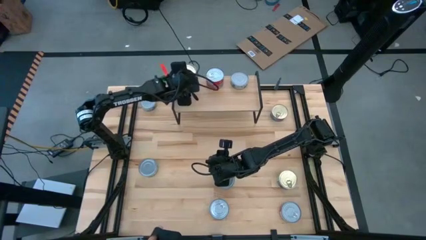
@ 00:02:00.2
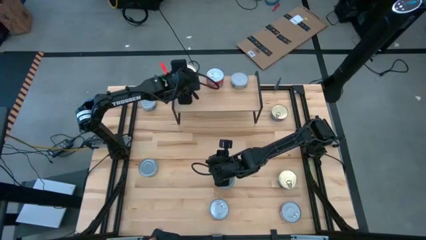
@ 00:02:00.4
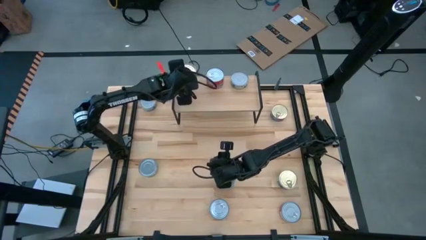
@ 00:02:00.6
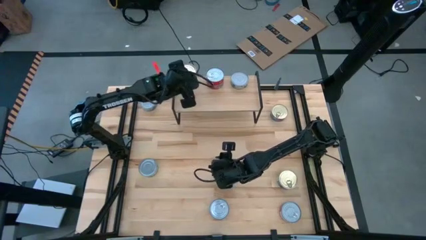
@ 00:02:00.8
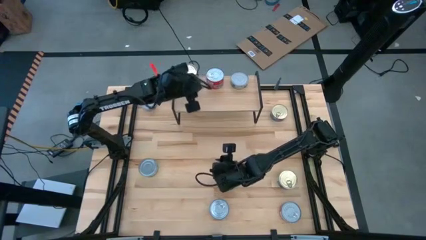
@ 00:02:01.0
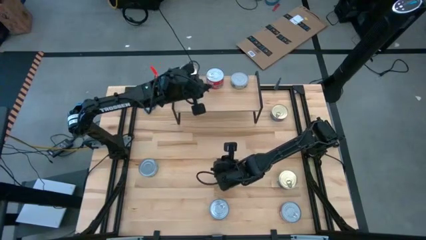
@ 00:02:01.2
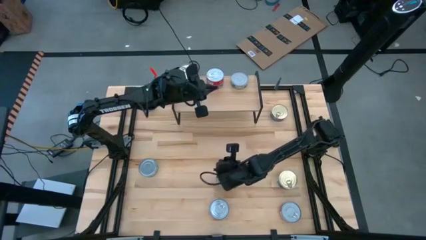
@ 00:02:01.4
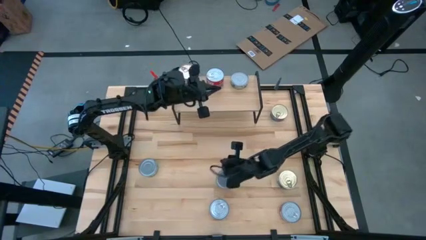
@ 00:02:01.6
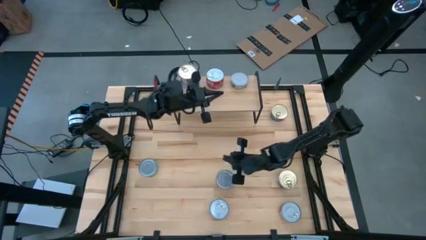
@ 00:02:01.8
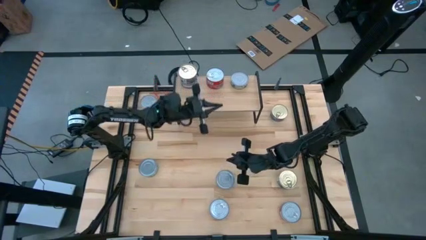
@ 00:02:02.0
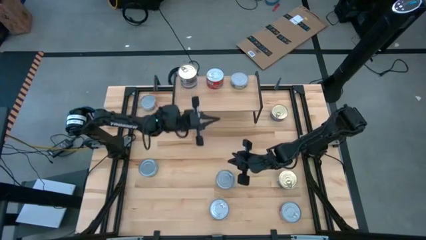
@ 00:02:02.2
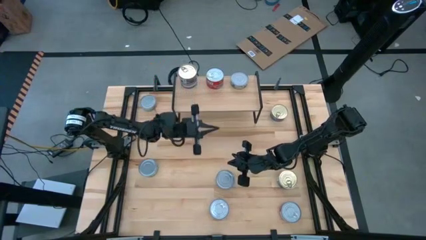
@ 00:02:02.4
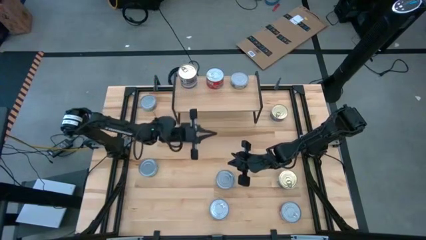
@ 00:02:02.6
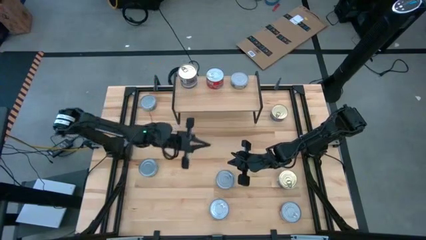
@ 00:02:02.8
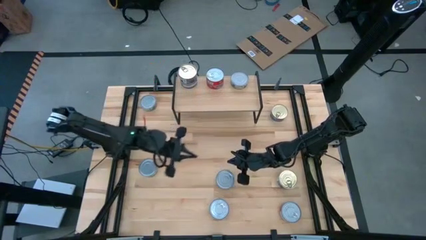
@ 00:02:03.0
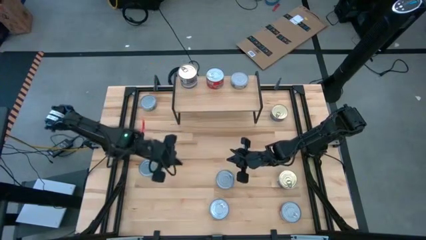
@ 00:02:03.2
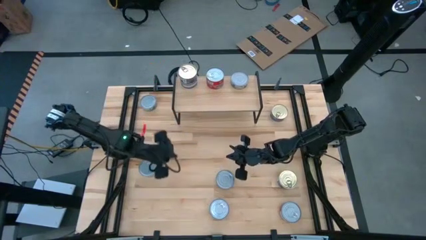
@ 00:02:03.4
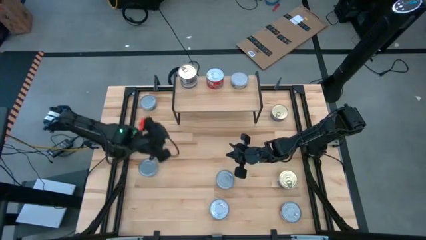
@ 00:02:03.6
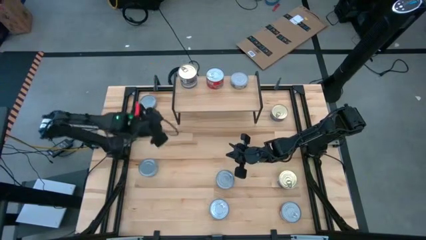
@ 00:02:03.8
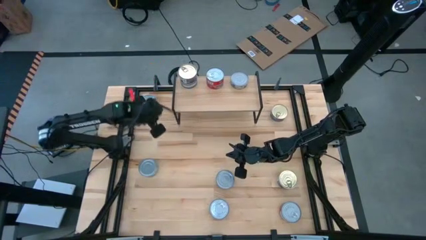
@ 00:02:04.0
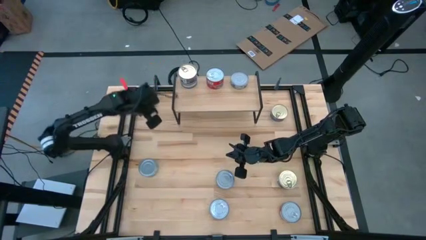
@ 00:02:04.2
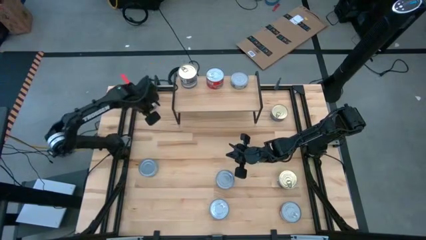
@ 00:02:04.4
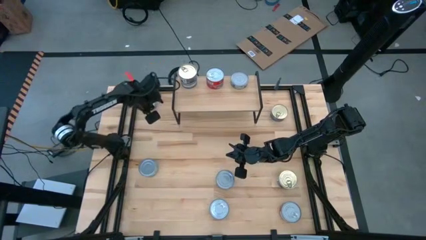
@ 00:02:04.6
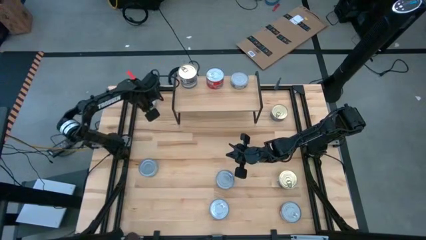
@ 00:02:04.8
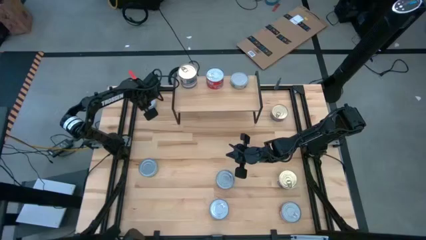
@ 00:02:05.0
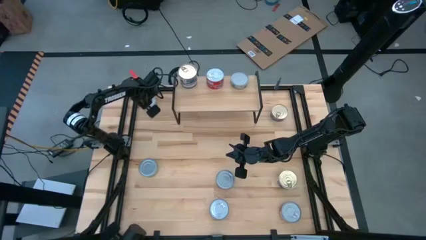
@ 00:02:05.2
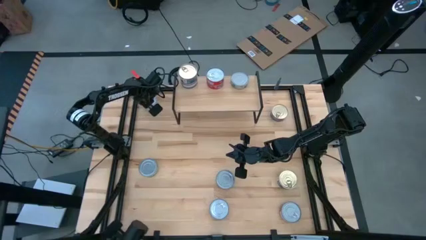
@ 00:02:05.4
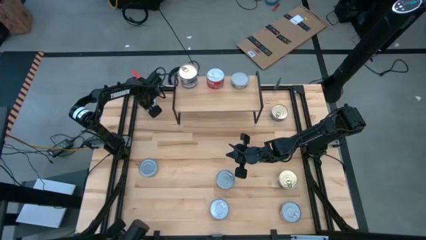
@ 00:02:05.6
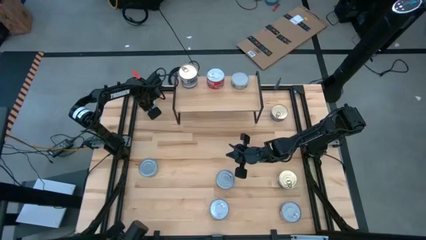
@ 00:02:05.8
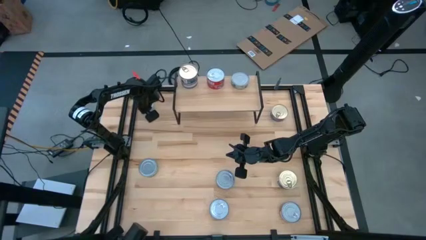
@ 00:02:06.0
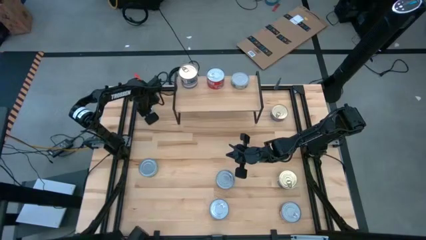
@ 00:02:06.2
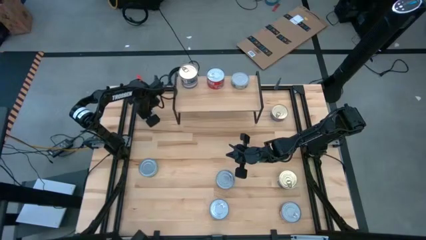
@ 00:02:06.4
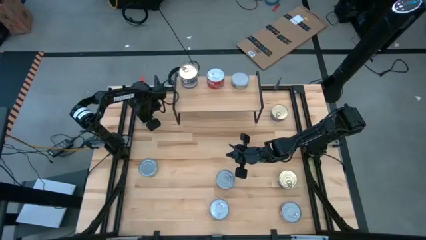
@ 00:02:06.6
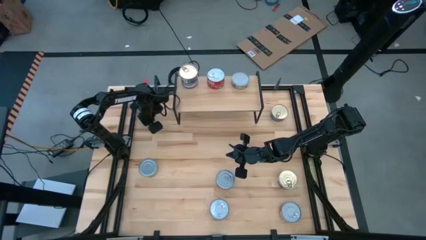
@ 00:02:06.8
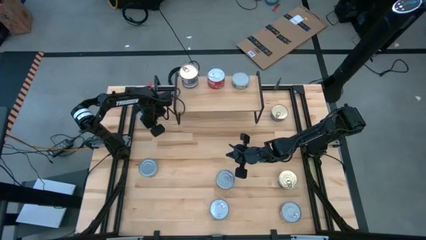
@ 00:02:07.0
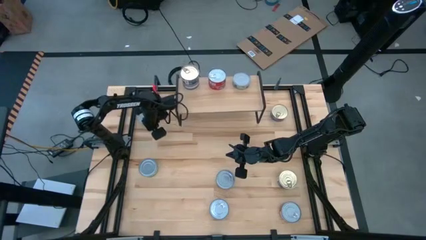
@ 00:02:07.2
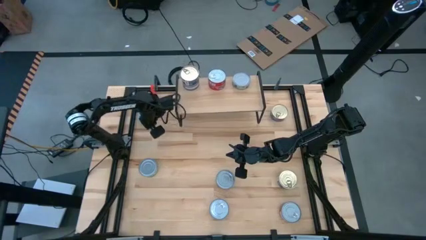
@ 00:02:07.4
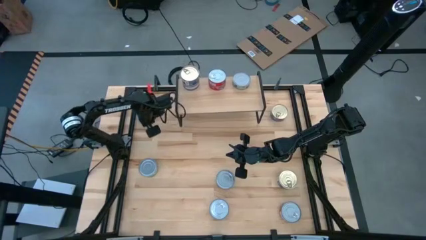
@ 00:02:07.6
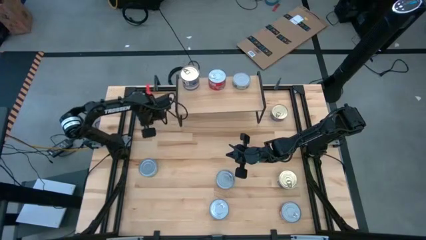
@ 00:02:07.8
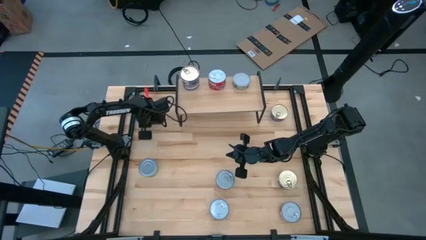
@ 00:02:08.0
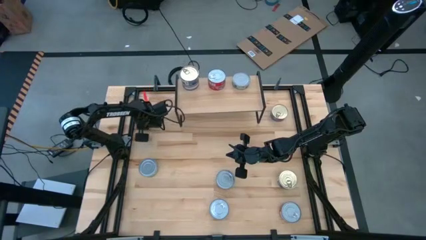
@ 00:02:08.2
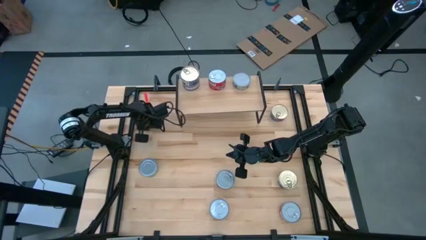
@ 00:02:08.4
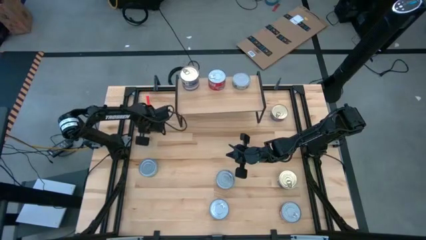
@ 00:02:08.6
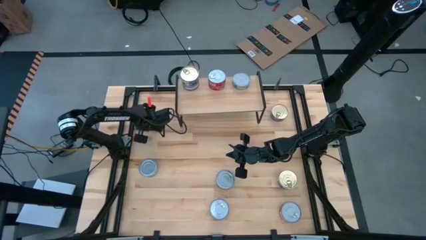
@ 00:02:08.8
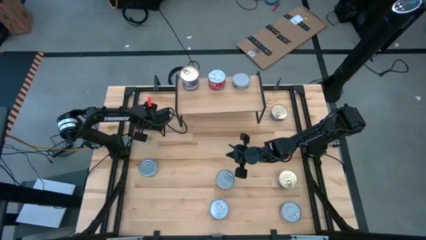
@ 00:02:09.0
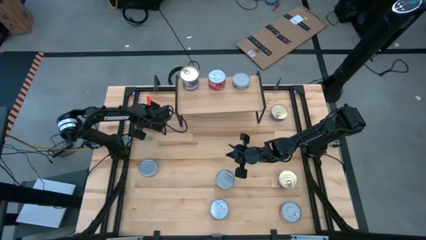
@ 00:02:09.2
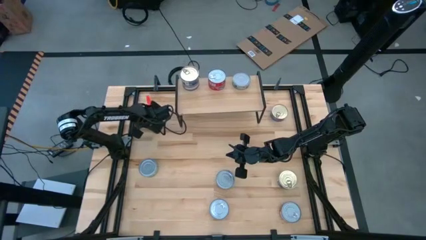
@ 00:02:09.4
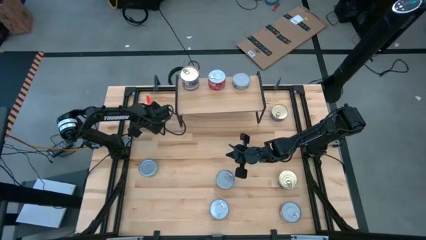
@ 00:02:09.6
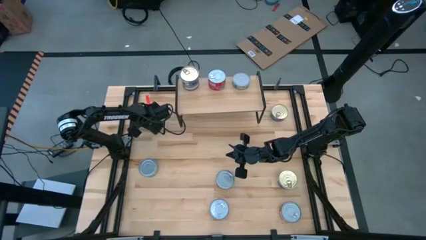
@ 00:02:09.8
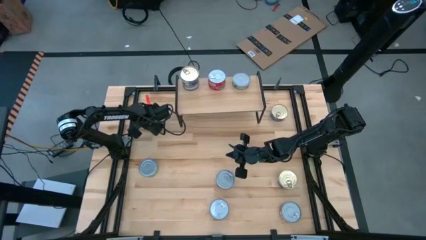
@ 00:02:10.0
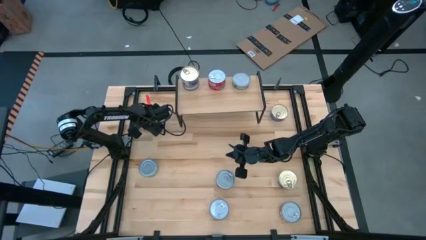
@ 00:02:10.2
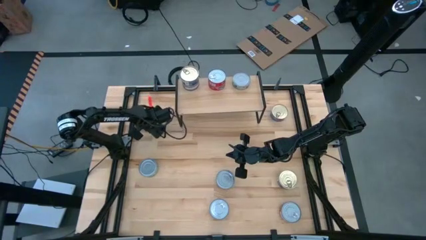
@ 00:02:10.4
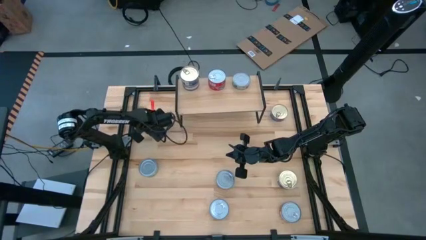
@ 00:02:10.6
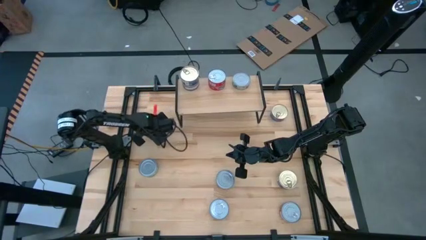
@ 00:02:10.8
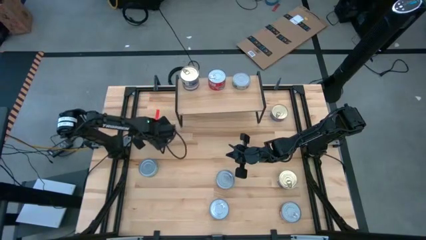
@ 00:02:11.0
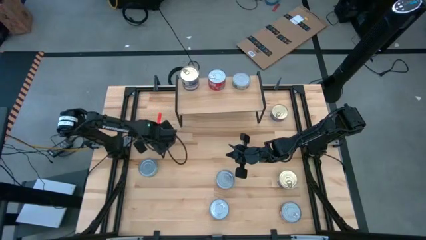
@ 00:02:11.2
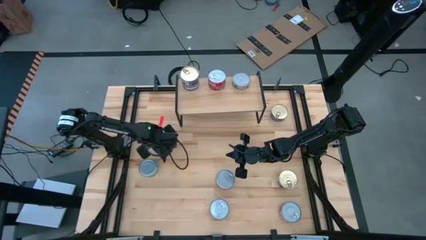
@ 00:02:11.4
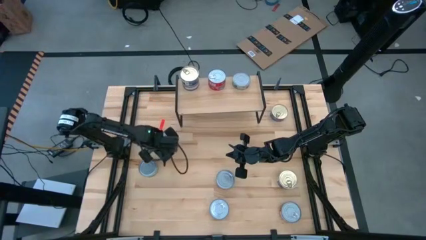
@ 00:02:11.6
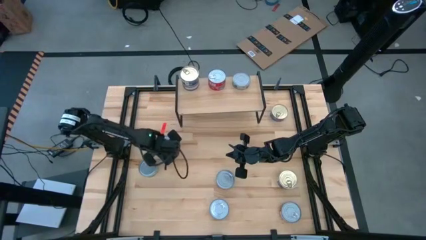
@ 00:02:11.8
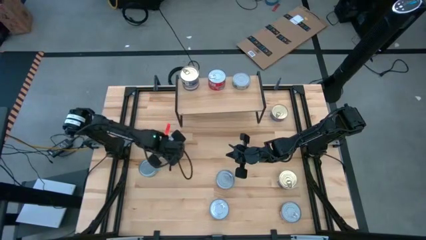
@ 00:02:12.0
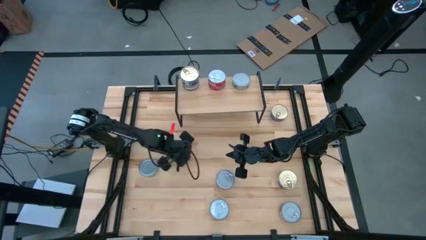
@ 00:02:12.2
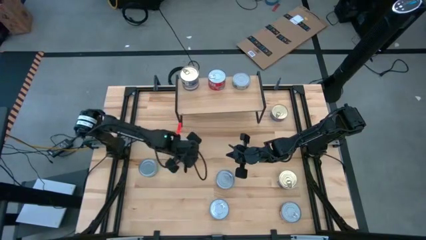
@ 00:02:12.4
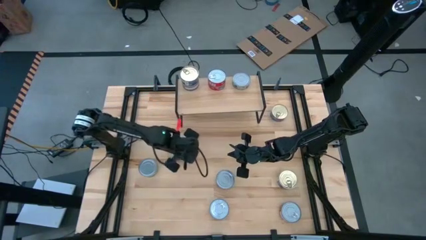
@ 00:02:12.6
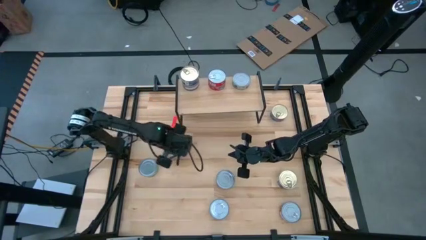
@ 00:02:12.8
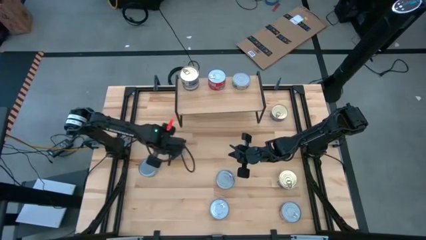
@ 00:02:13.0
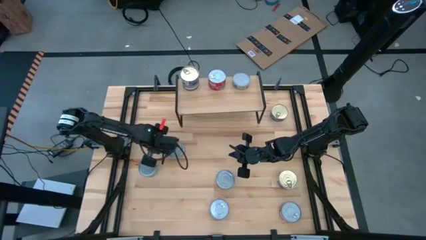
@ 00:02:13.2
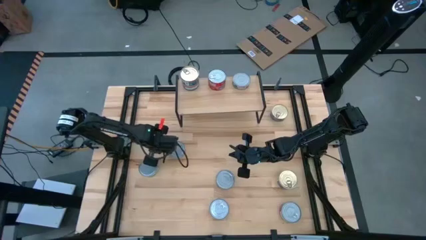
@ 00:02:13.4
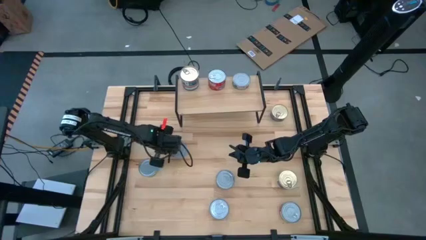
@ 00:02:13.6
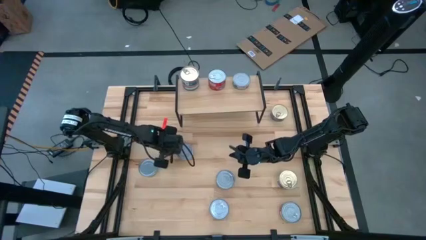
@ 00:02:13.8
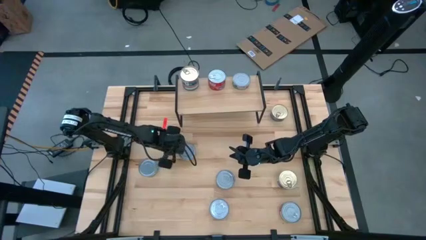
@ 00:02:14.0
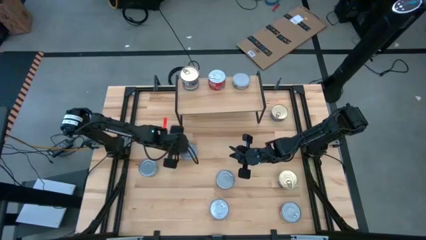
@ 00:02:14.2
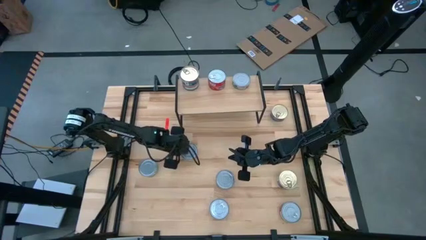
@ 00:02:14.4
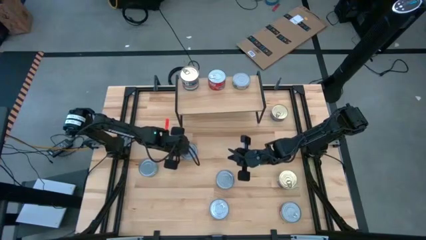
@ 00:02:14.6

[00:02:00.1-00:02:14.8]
Task: Stack canned seafood by type on shelf
Stack the green tuna can on top of the other green tuna can on the shelf

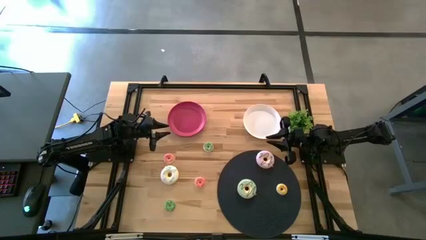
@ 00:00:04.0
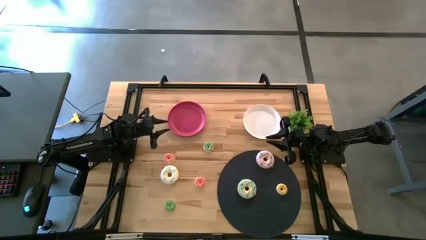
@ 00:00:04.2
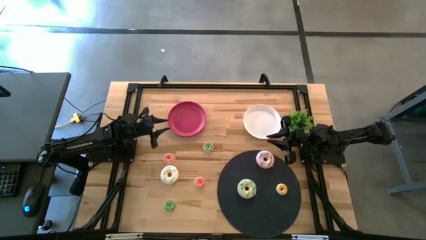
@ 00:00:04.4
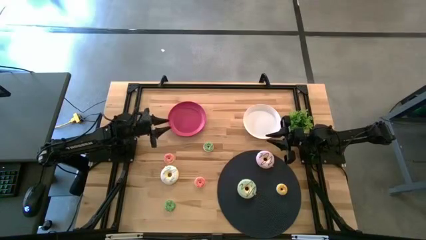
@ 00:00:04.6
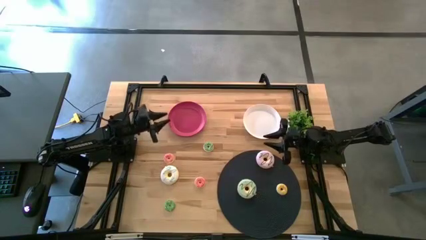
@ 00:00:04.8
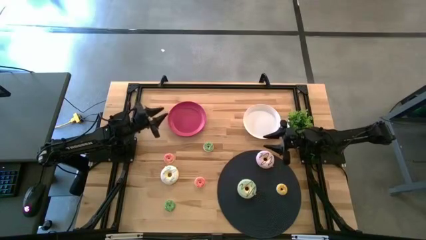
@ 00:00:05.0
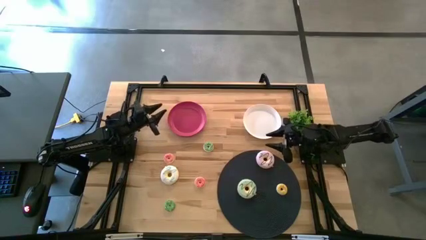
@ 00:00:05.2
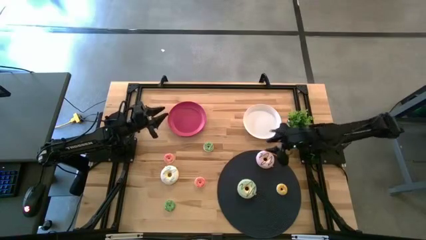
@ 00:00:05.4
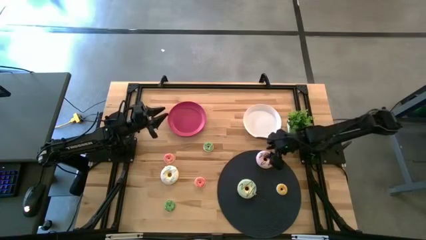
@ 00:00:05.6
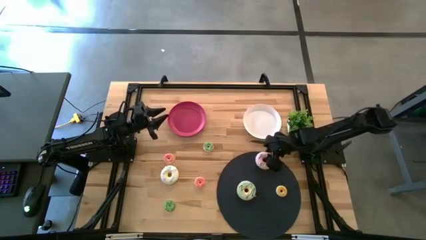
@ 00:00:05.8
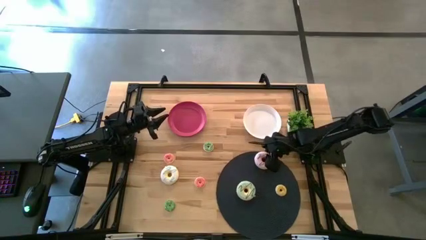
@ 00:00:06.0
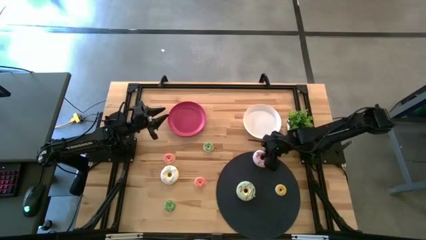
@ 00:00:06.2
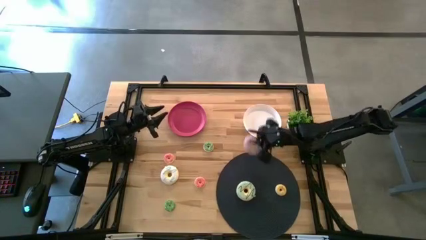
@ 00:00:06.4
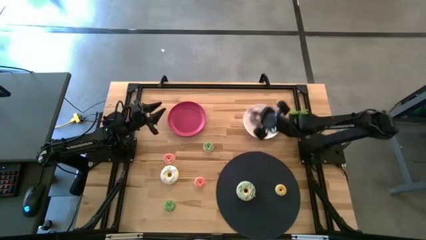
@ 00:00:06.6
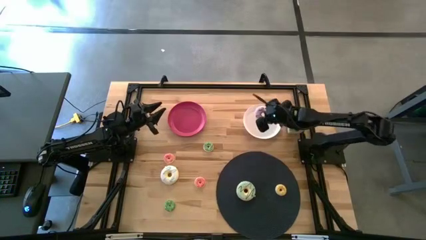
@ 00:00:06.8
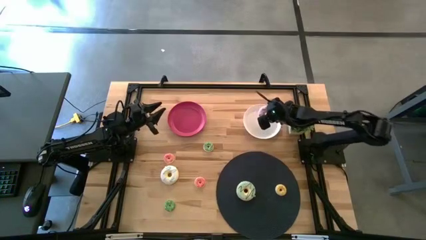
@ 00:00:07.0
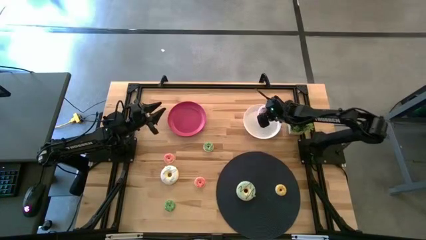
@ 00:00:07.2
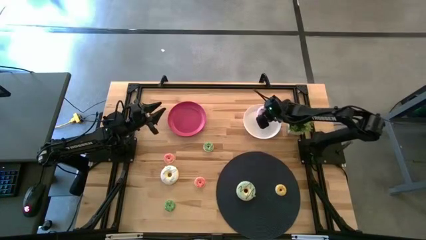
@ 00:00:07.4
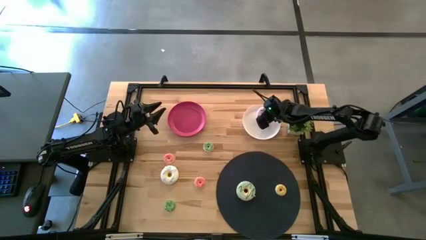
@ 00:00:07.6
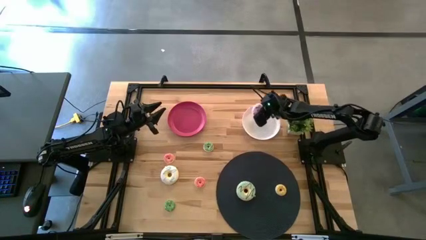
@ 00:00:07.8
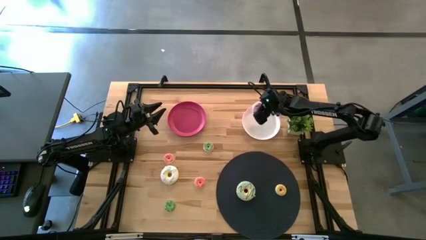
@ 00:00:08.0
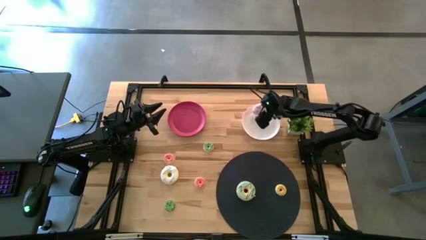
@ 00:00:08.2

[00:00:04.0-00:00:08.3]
Task: Pick & Place donuts
Put the large purple donut on the white plate
